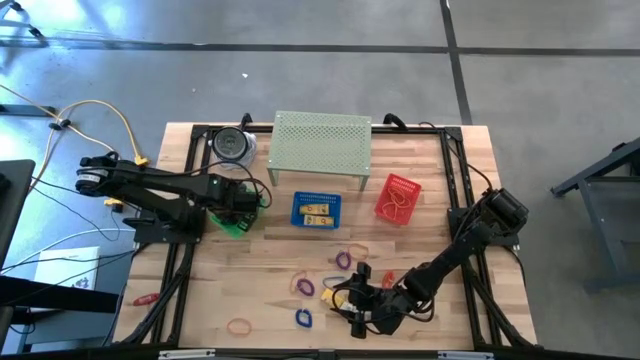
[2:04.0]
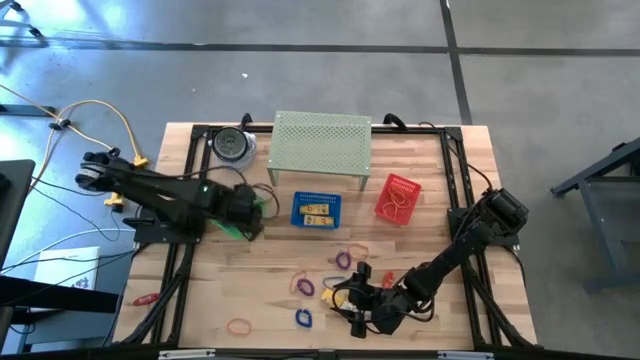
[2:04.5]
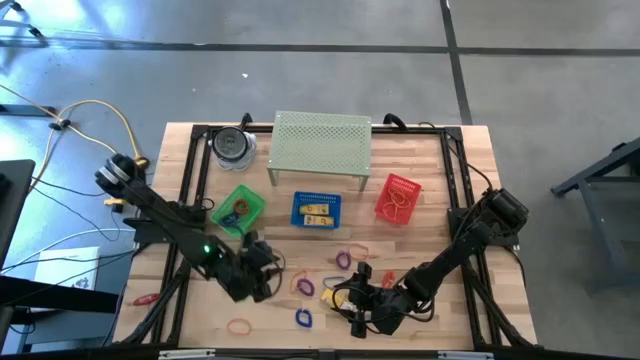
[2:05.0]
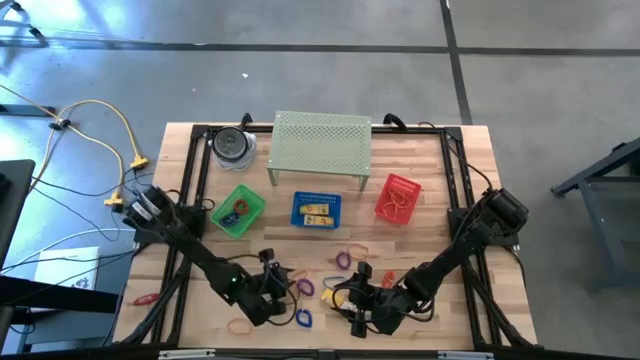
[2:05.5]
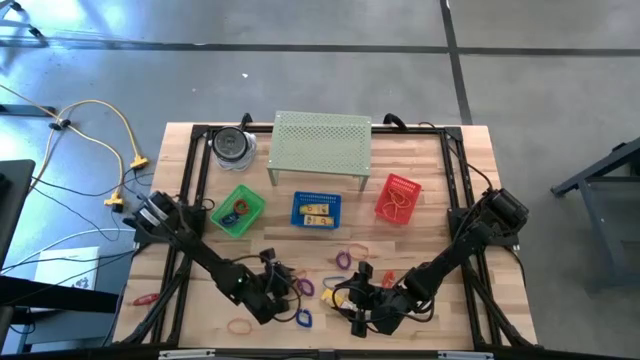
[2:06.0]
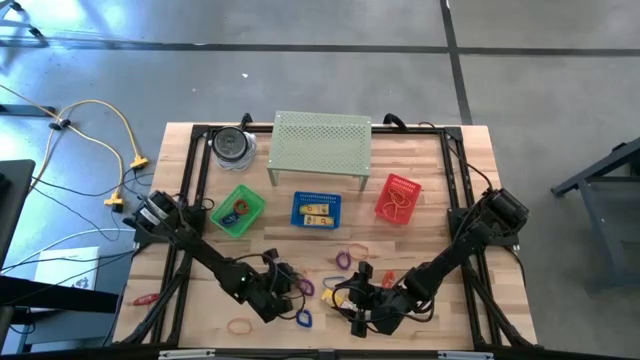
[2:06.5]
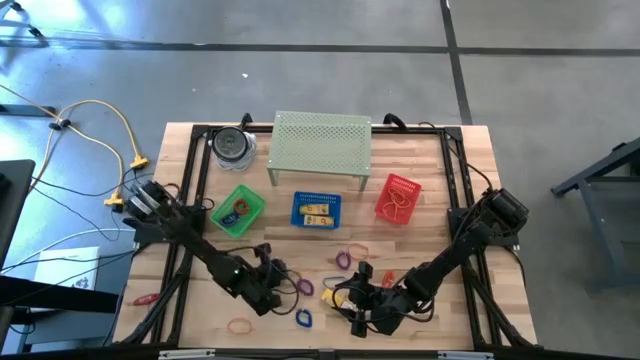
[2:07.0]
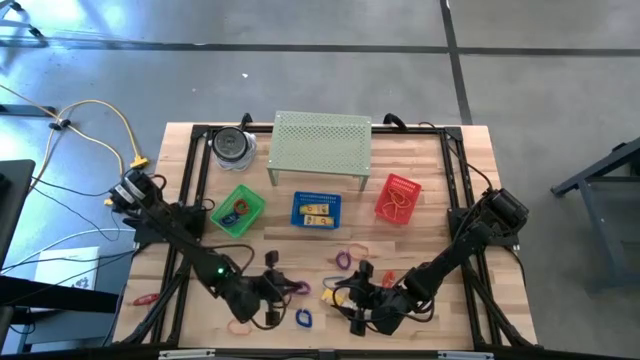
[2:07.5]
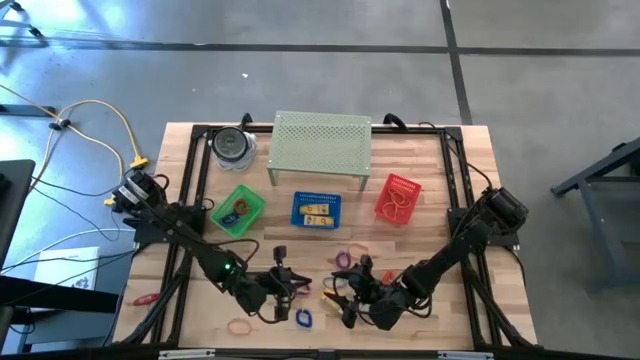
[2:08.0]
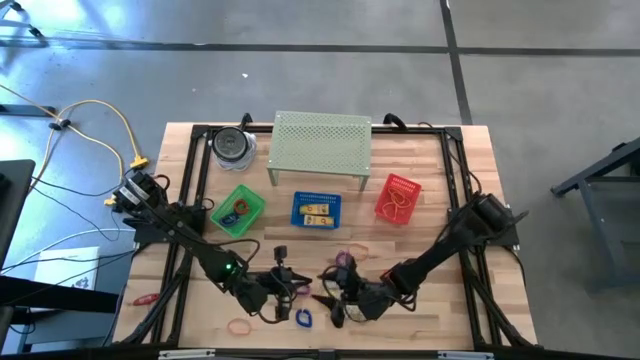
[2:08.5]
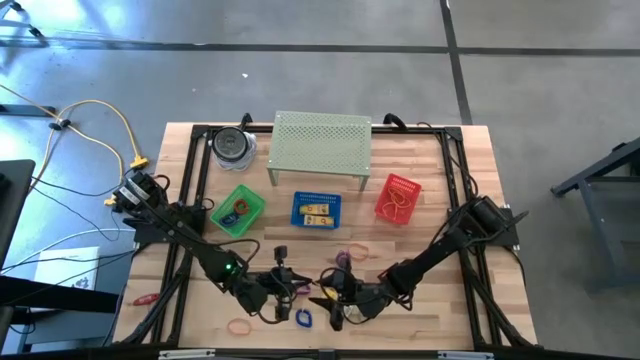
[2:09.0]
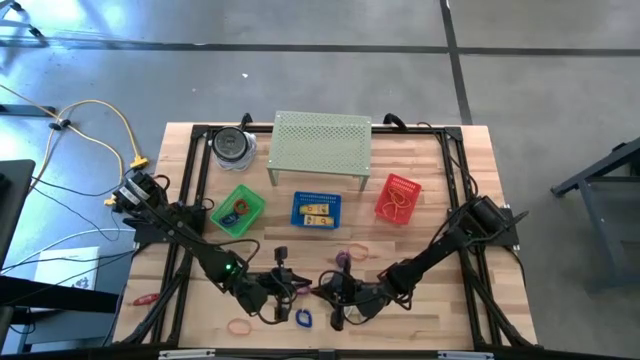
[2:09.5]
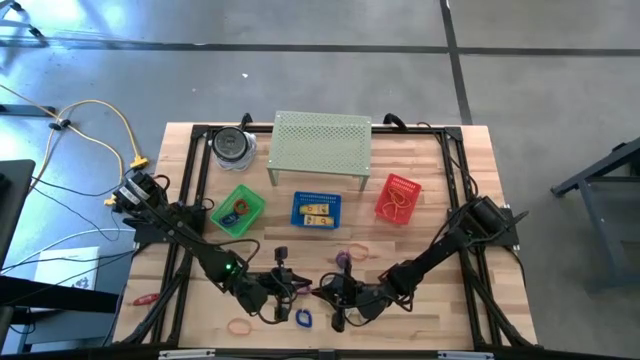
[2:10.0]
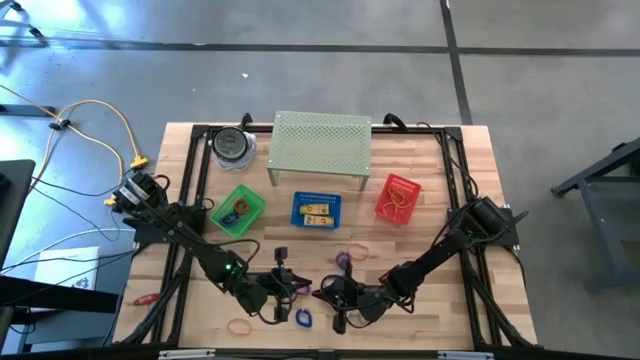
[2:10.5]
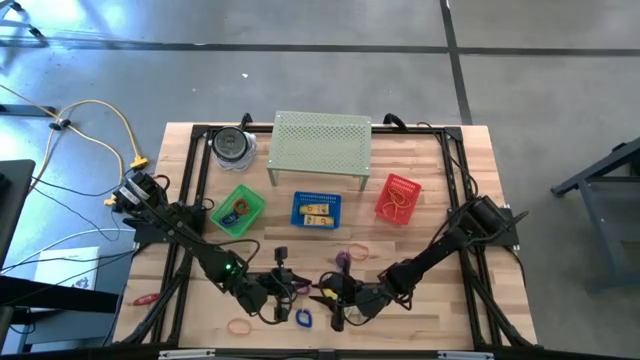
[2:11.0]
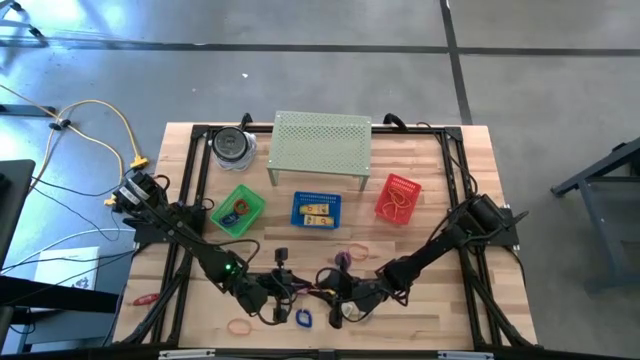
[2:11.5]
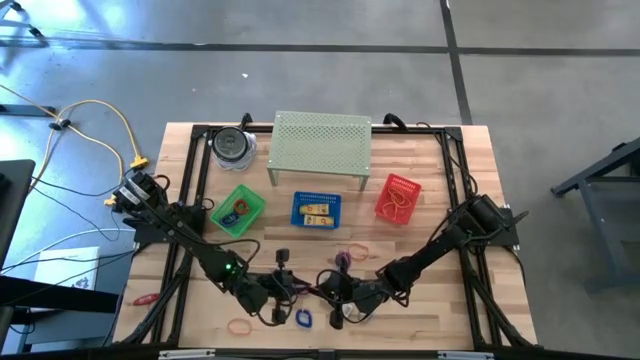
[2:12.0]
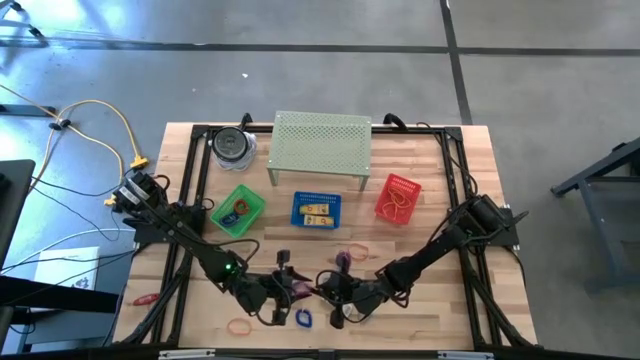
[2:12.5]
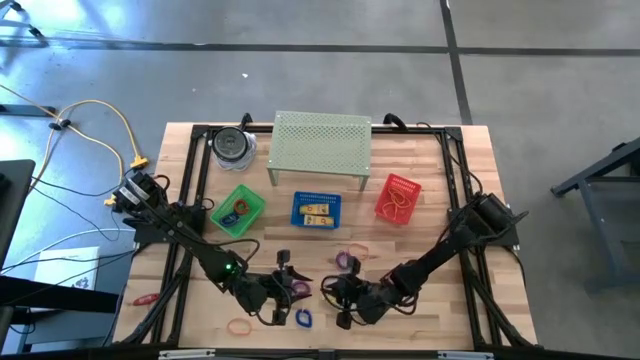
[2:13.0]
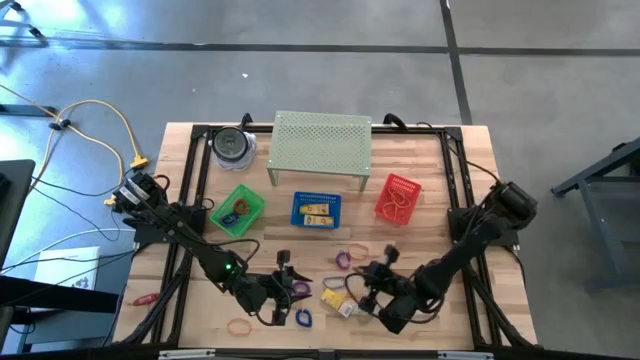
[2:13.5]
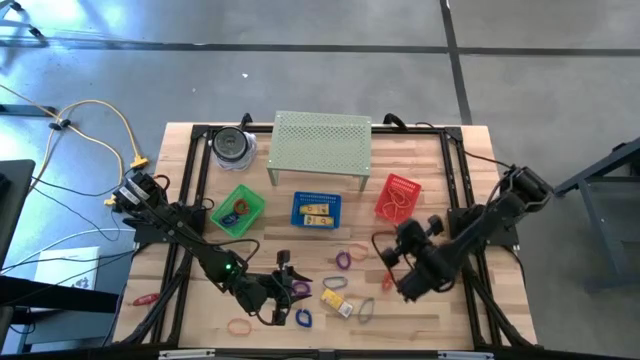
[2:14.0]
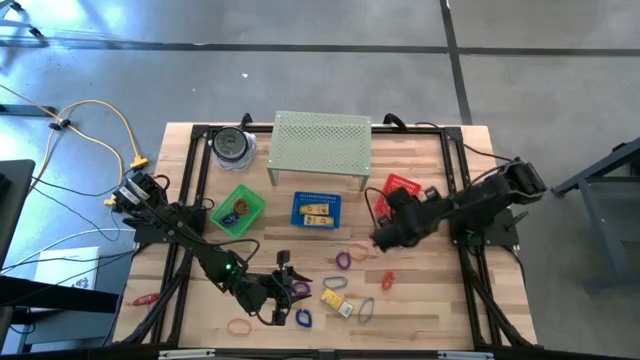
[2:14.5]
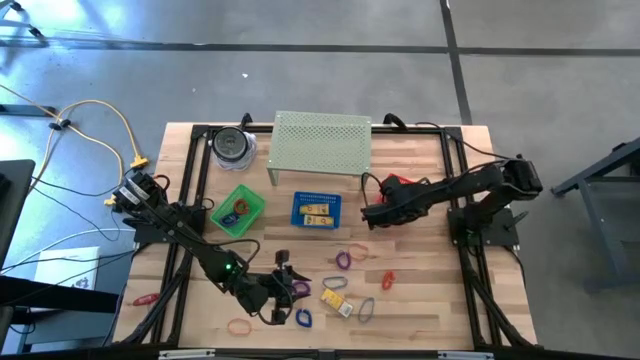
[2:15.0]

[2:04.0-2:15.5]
Task: Pick & Place Office Desk Supplies
Put the orange rubber band into the red bin

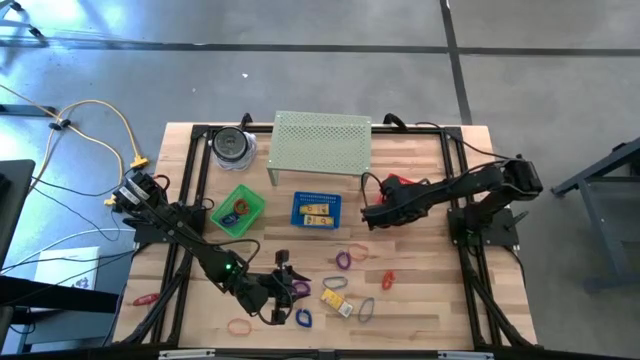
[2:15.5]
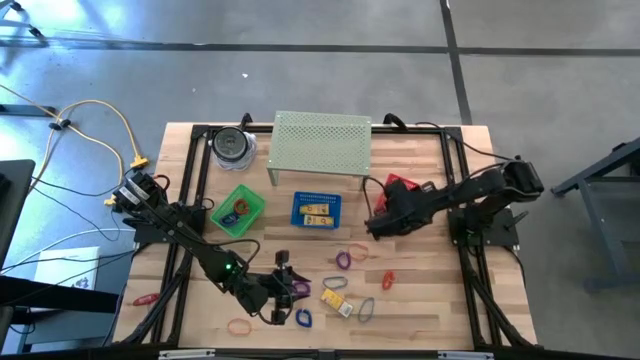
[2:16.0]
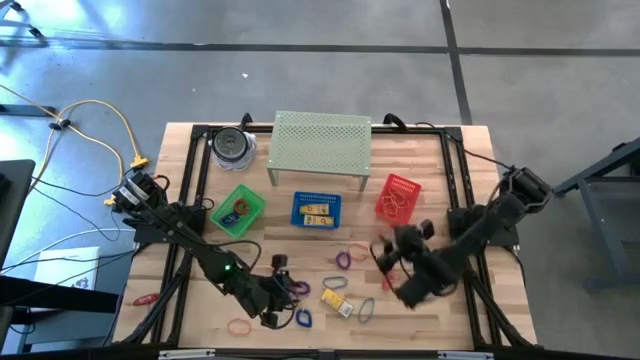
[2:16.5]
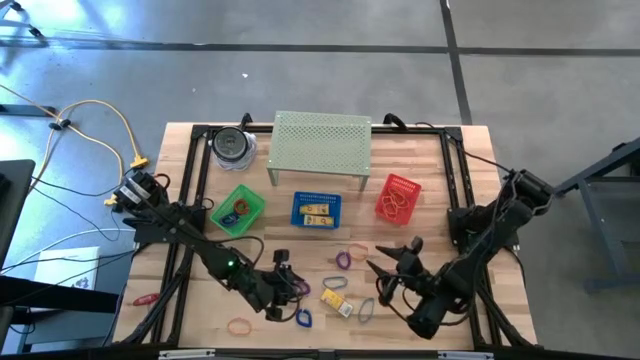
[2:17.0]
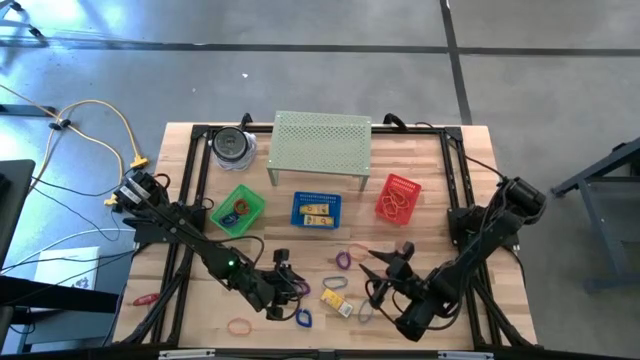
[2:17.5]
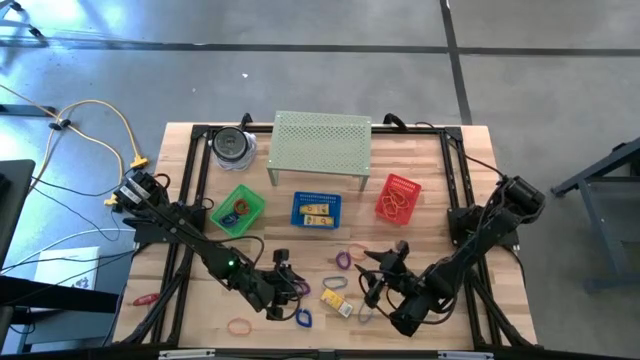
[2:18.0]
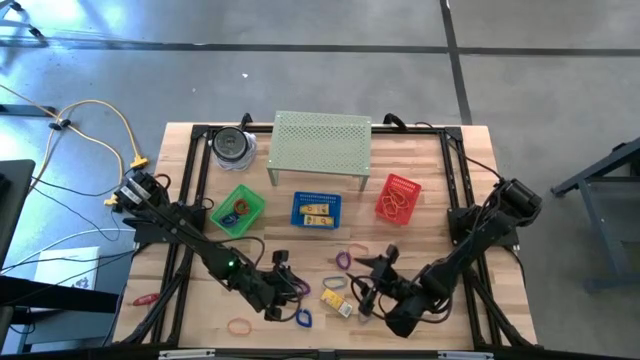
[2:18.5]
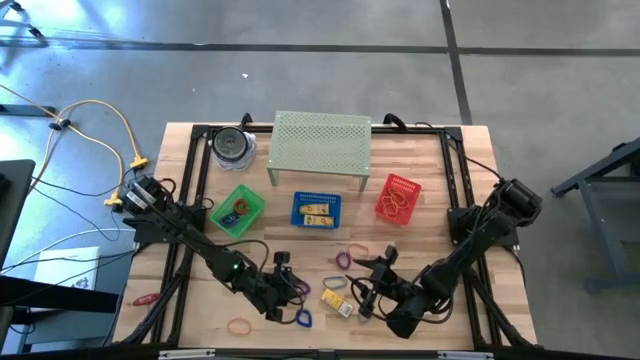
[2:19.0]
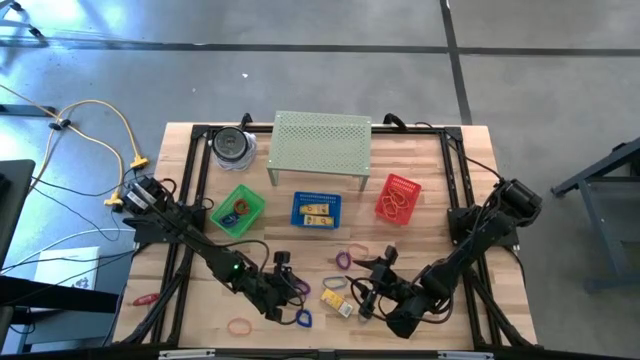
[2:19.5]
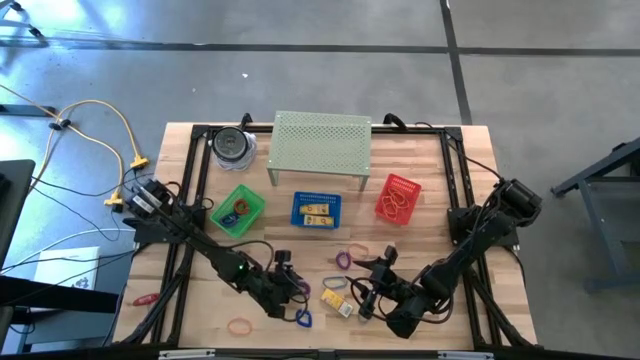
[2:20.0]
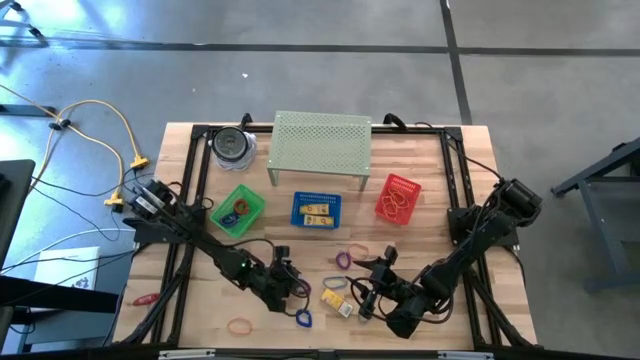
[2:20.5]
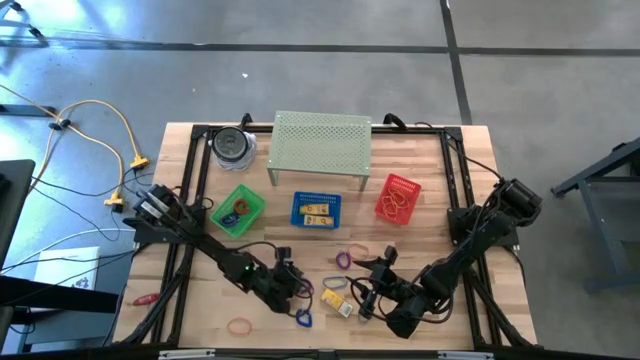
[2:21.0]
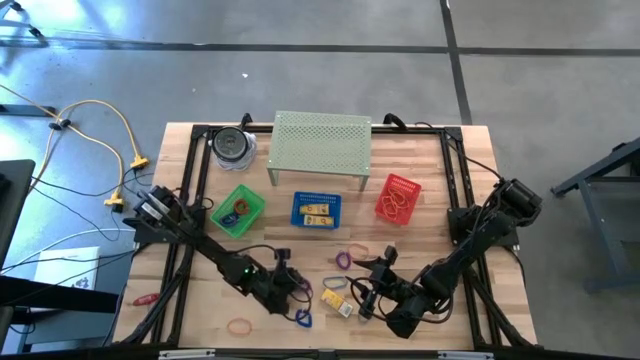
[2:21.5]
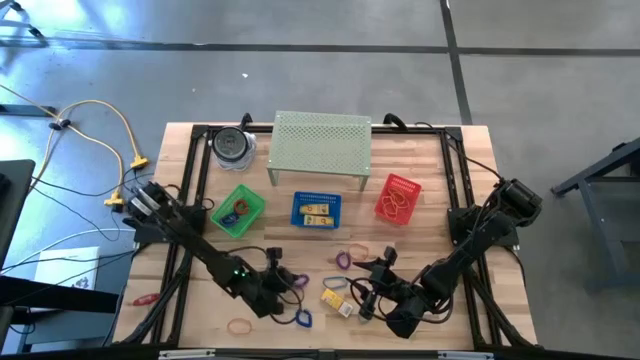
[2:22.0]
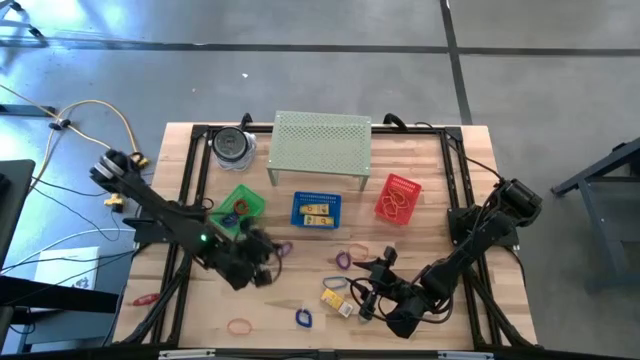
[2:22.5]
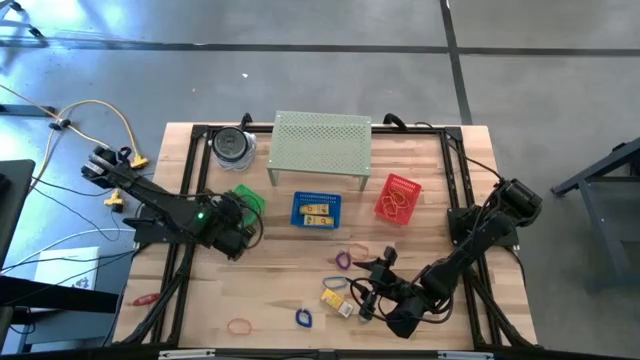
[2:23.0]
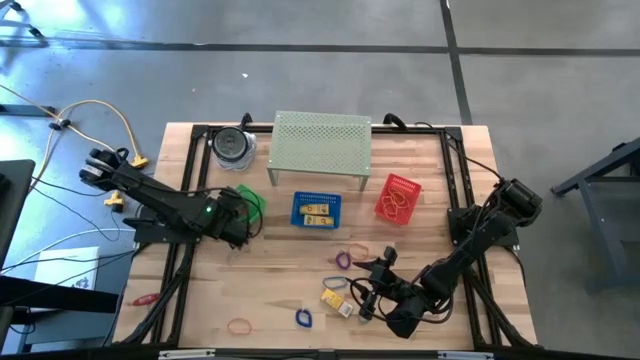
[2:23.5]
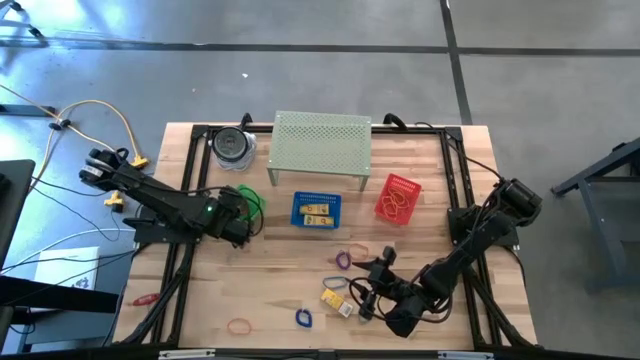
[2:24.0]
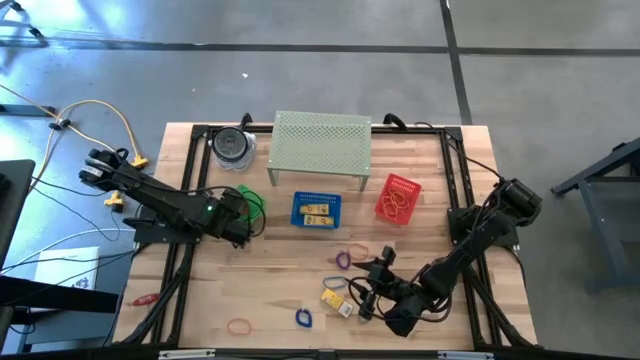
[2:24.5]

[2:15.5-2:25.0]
Put the purple spring keychain into the green bin

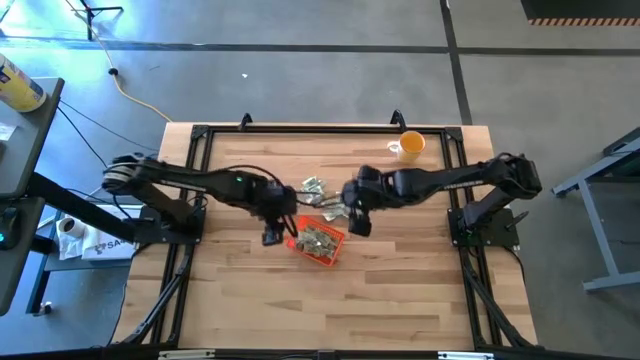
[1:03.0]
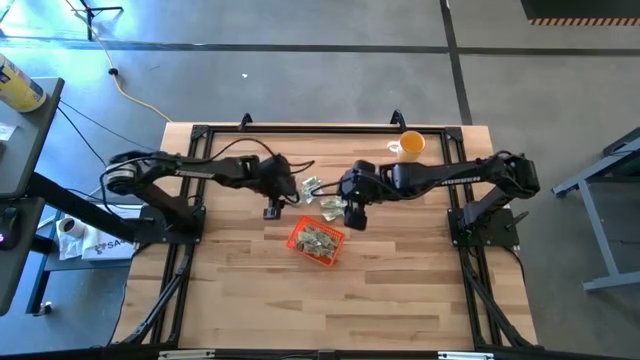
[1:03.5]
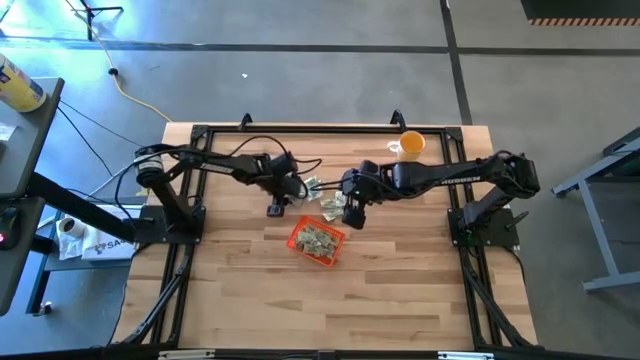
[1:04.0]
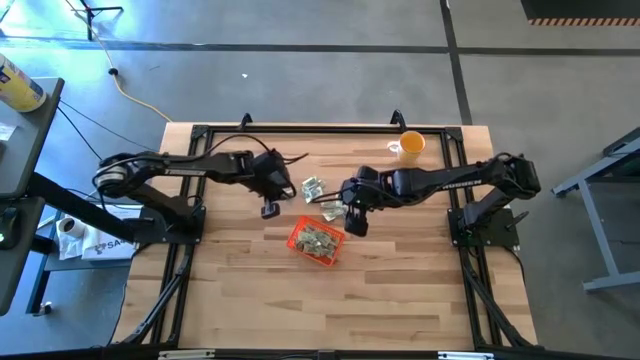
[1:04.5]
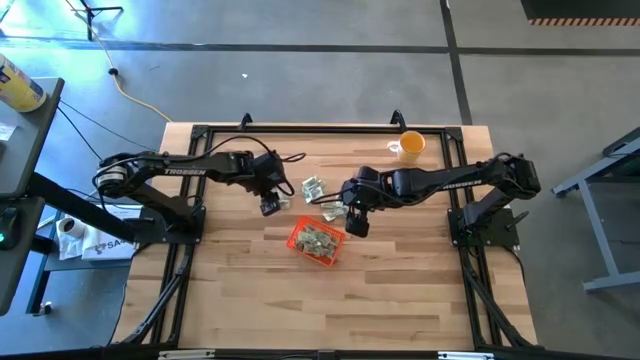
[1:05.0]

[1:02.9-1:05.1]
Task: Pick and place Stevia / Truvia into bins
Put the stevia packet into the orange bin
